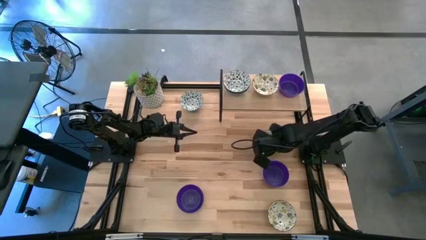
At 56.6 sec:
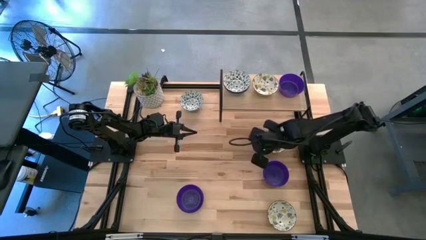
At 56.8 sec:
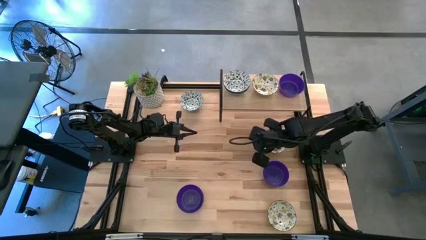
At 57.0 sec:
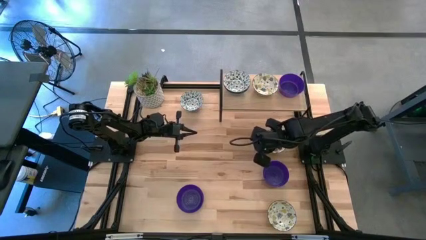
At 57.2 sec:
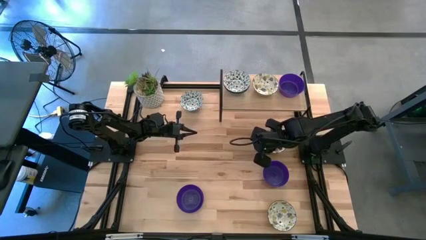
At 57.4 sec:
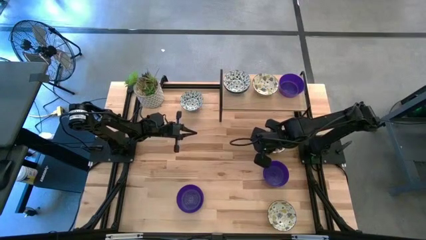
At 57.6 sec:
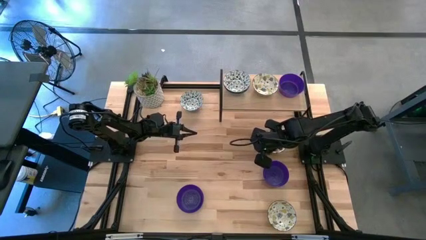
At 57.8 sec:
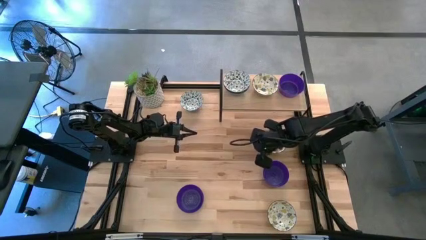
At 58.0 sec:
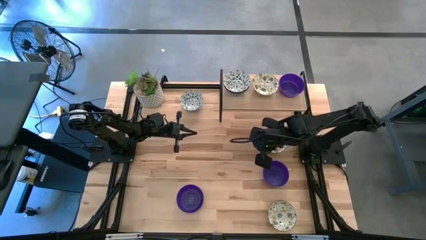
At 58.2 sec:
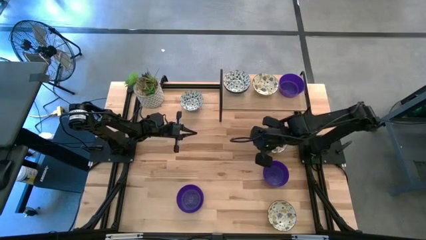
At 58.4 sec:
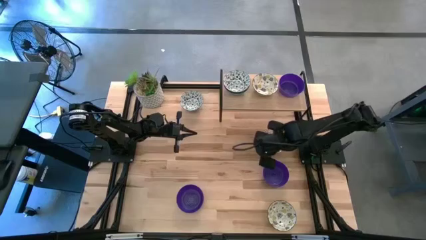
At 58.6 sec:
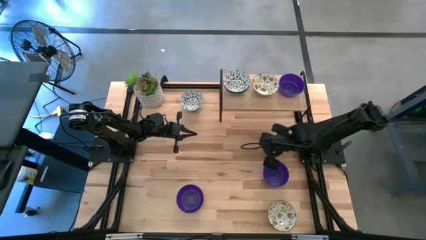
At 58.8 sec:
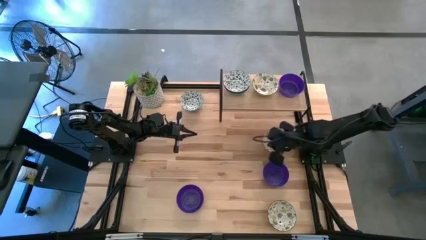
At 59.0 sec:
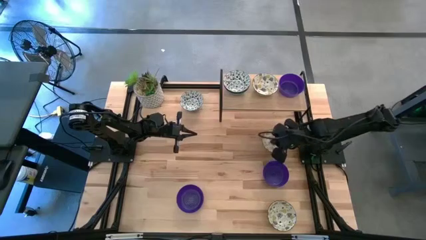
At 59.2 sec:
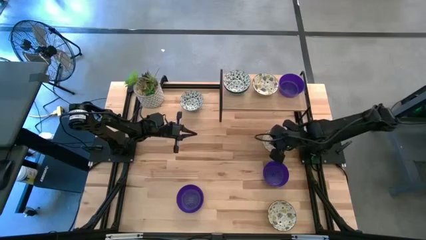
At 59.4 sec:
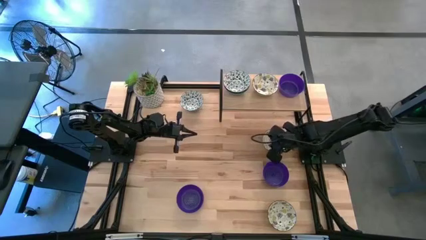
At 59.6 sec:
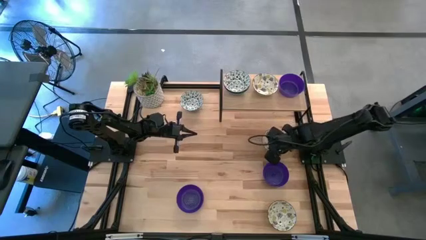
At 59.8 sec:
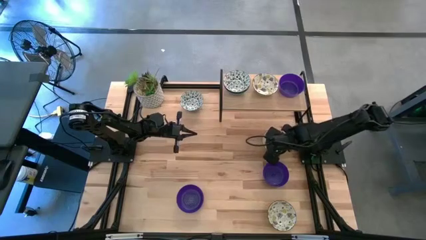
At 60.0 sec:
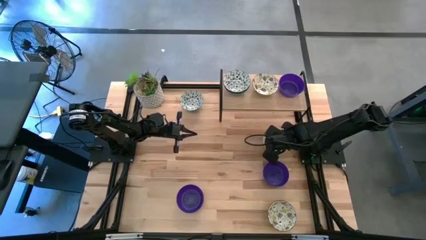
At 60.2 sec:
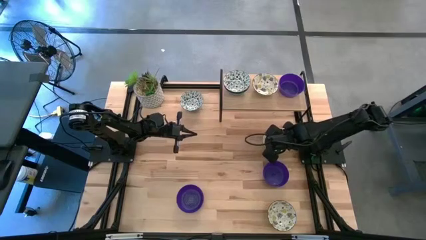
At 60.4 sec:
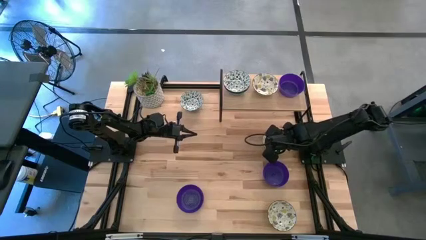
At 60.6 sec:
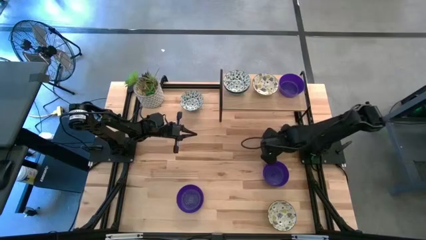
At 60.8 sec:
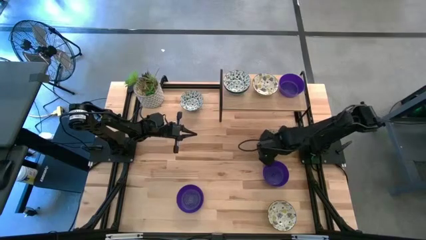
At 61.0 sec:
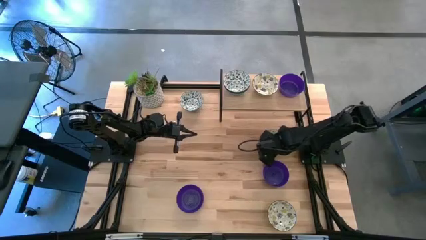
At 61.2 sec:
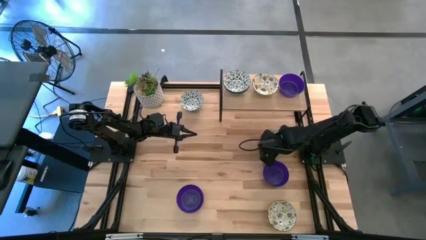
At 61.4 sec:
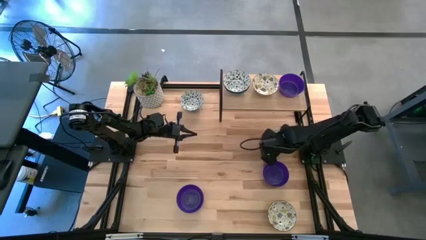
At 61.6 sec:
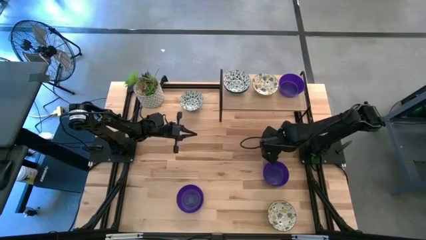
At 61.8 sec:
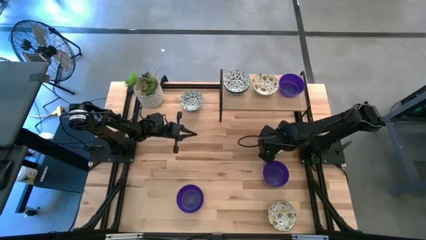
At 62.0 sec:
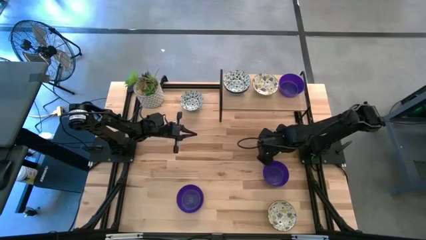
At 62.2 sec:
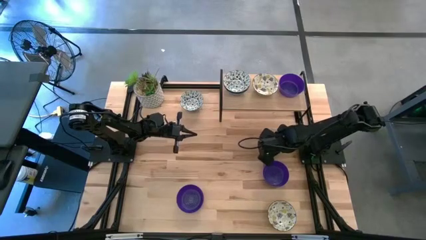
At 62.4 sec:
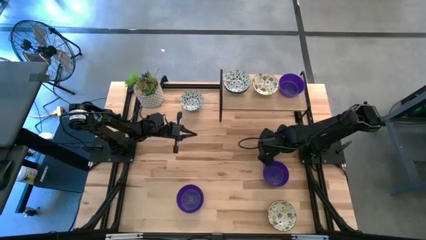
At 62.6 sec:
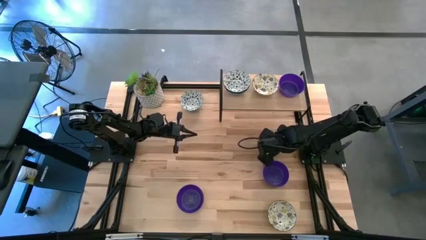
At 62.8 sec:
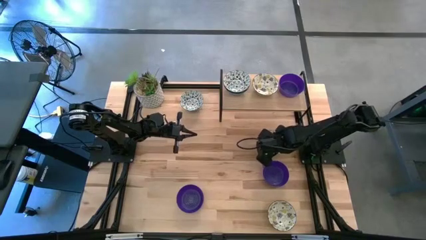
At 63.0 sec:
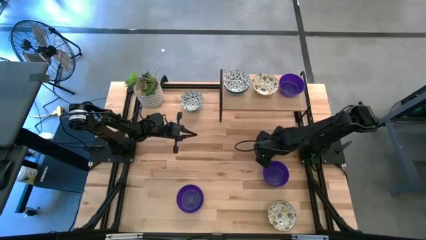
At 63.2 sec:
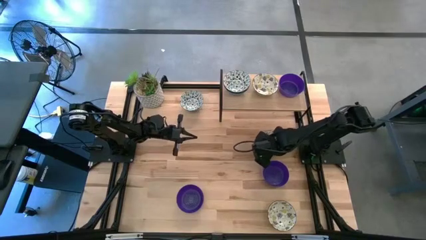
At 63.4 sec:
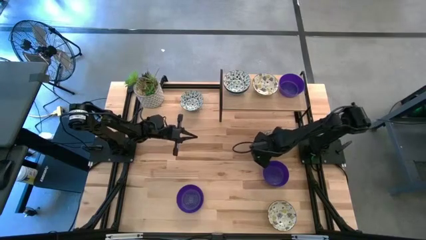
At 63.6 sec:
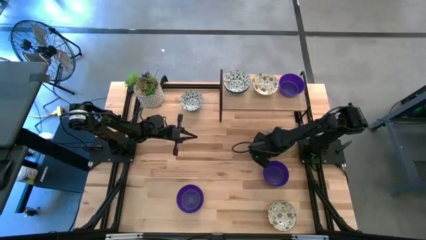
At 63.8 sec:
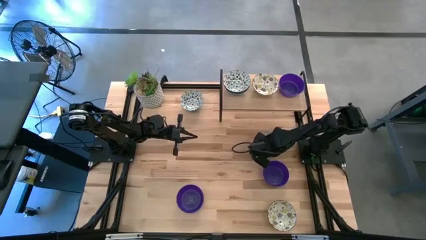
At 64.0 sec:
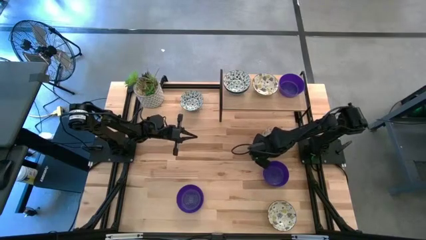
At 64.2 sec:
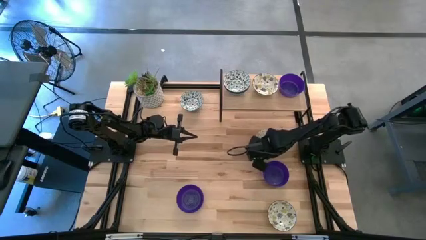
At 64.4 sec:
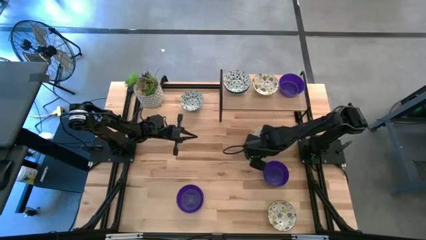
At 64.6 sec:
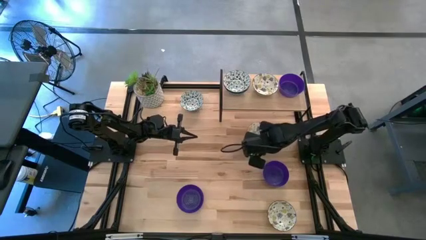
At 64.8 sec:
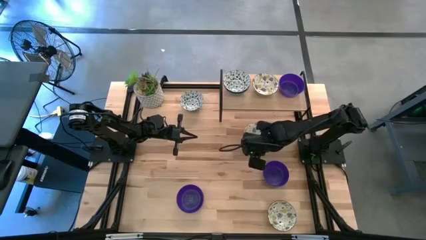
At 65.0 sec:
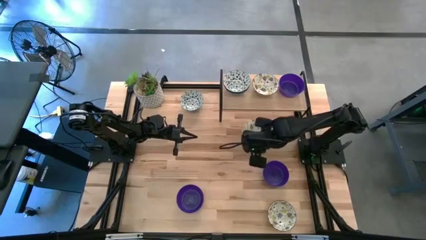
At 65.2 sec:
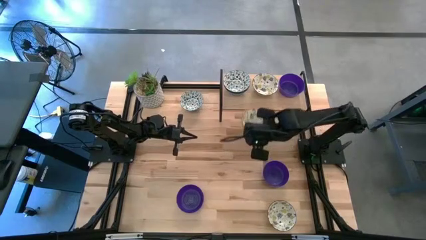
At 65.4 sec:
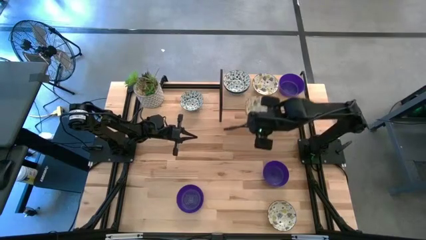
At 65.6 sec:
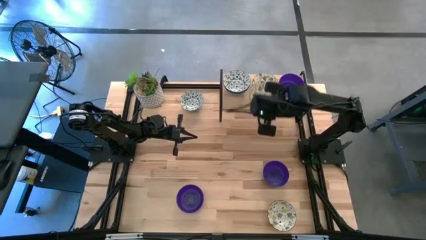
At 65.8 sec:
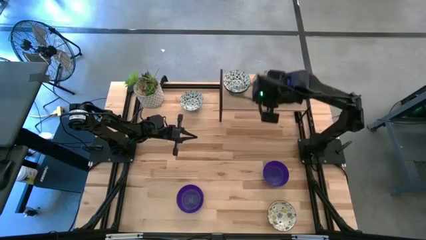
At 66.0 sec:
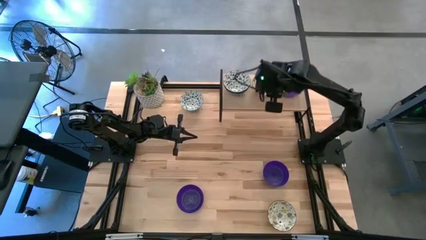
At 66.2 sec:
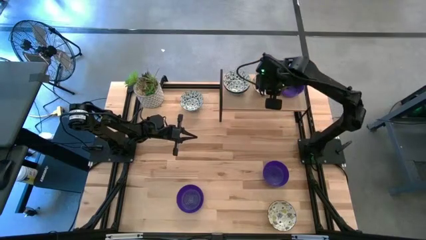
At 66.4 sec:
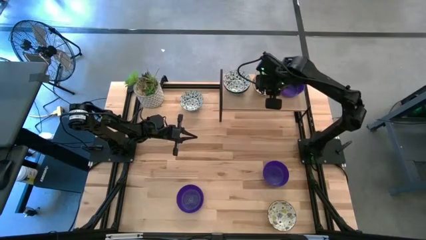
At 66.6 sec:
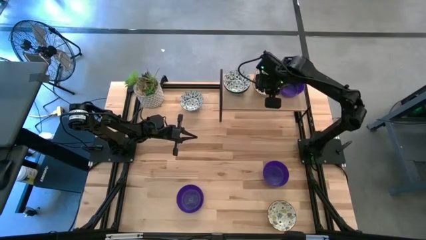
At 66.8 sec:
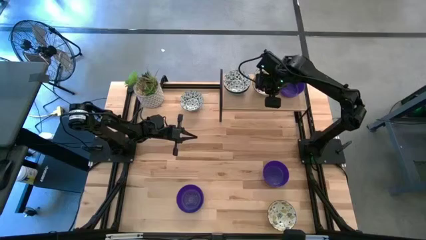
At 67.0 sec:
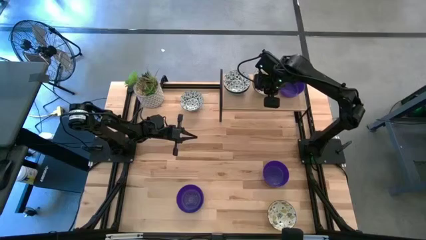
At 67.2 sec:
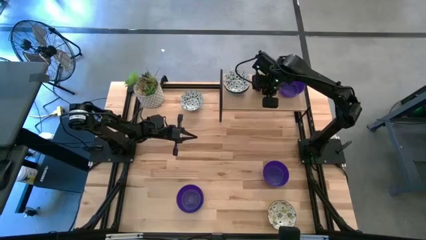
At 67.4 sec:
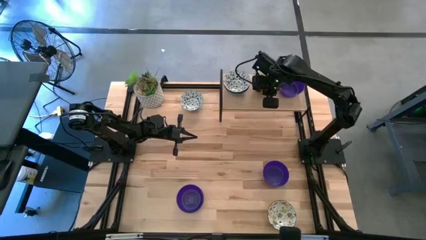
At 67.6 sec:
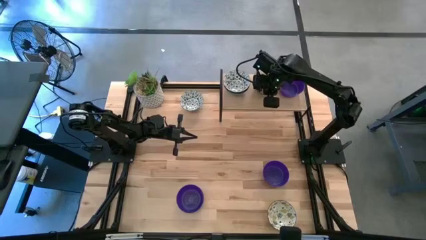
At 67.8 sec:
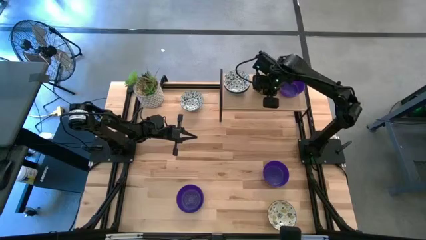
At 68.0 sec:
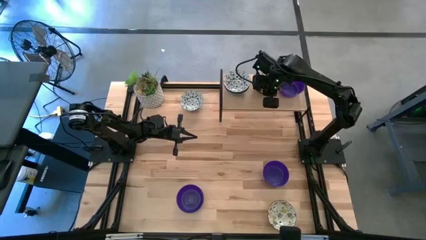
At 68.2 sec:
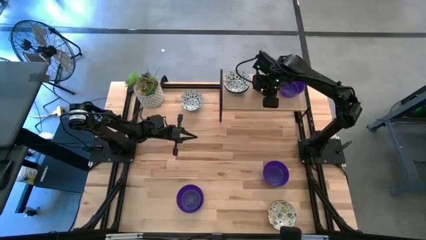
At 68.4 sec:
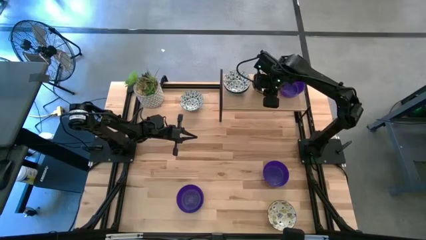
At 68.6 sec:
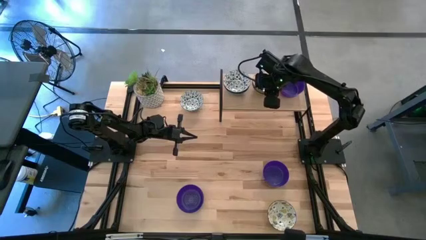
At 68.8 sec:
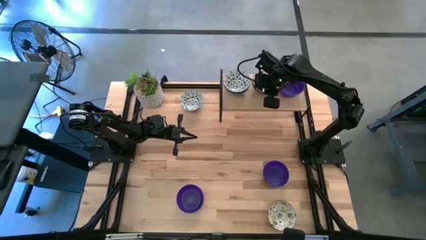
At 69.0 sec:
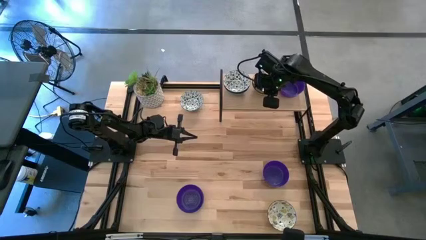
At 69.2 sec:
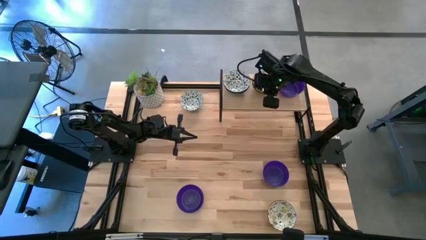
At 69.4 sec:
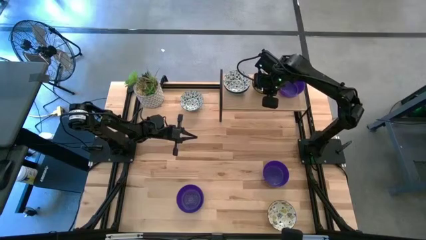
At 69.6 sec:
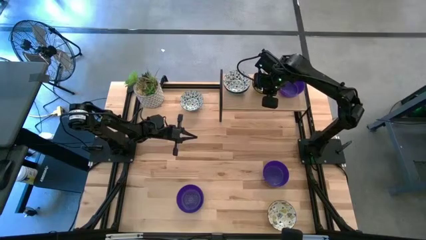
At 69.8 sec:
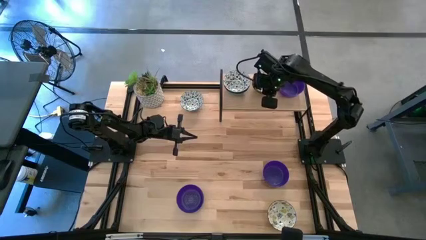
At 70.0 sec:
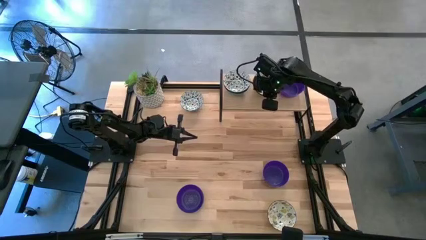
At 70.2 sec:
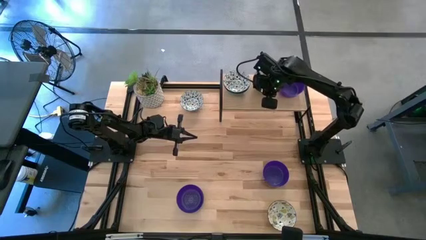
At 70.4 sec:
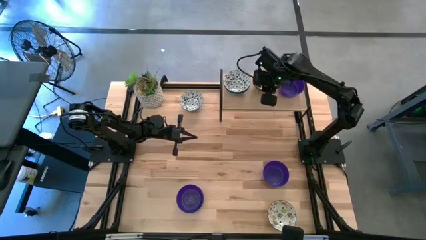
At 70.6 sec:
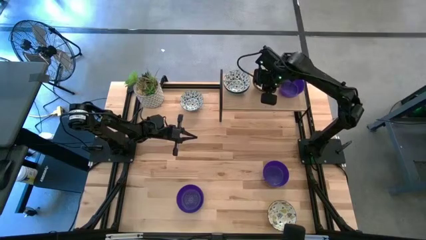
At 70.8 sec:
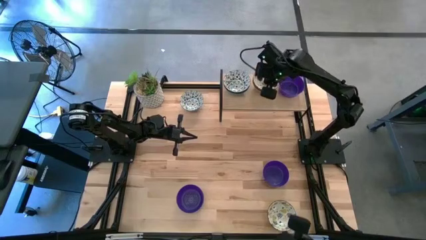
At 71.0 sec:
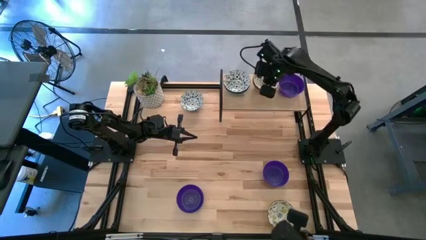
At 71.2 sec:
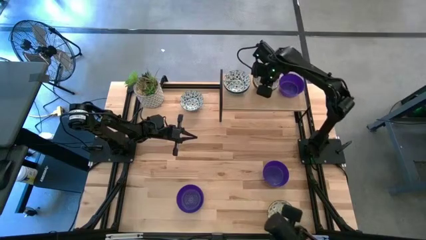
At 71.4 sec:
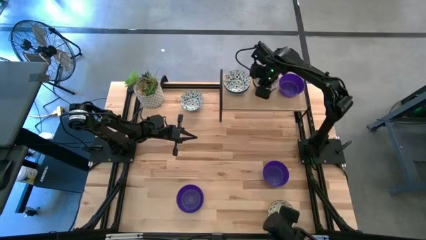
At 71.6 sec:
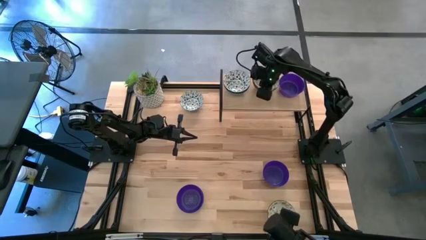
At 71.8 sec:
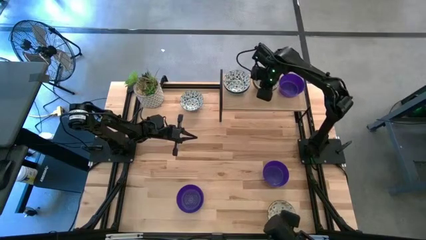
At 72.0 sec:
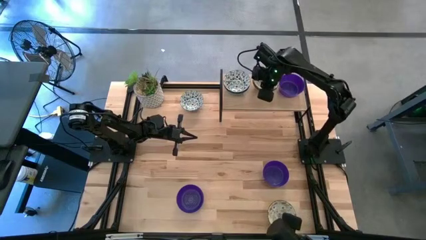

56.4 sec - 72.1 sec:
Task: Pick & Place Mini bowls
Stack the top white patterned bowl on the white patterned bowl on the shelf
